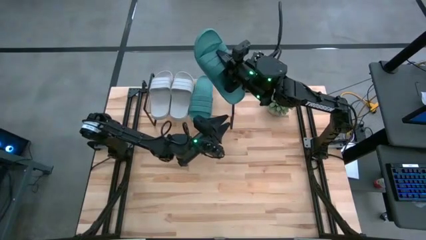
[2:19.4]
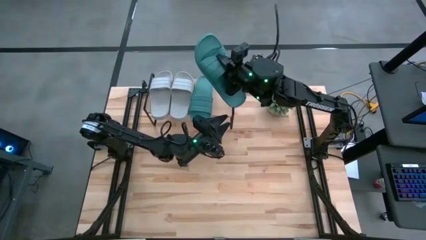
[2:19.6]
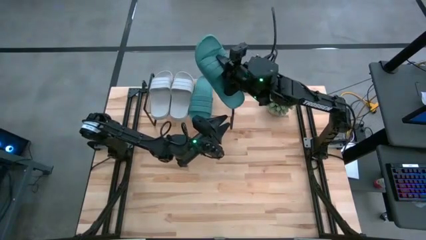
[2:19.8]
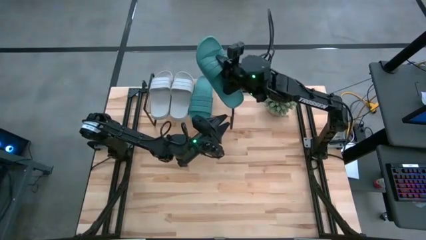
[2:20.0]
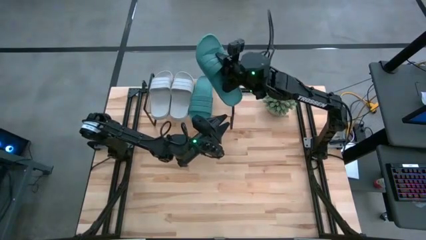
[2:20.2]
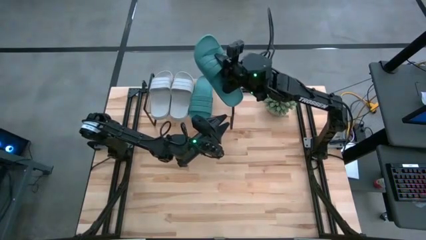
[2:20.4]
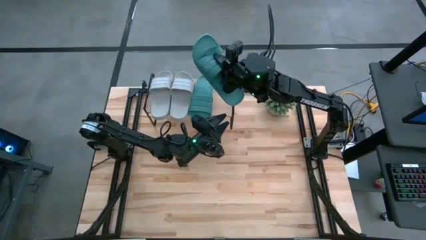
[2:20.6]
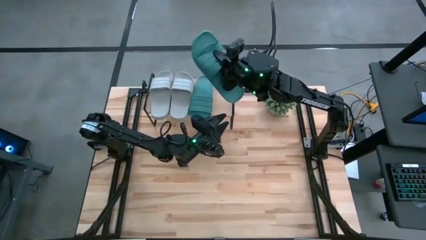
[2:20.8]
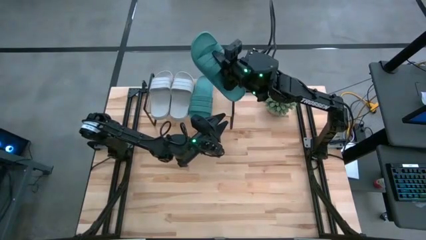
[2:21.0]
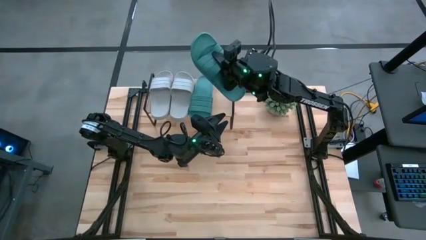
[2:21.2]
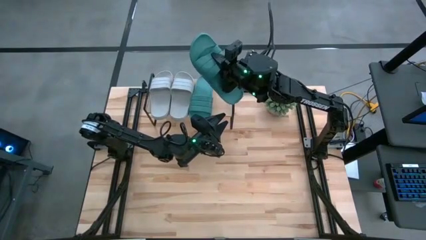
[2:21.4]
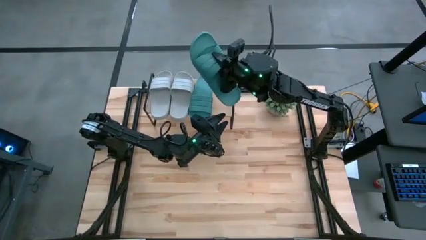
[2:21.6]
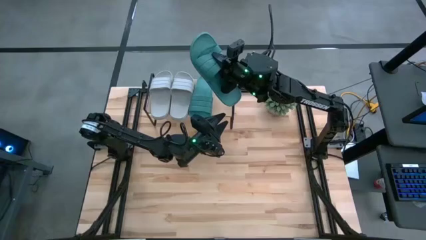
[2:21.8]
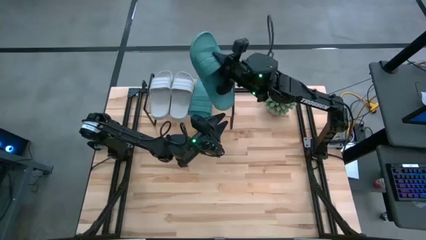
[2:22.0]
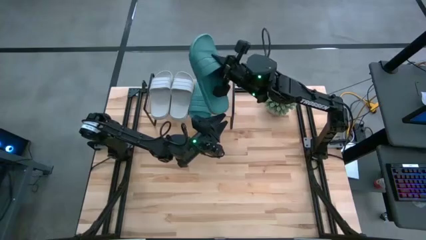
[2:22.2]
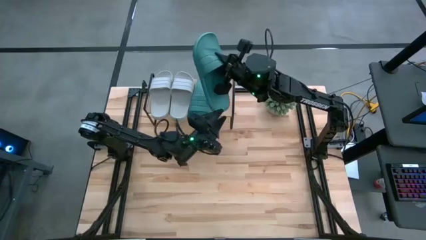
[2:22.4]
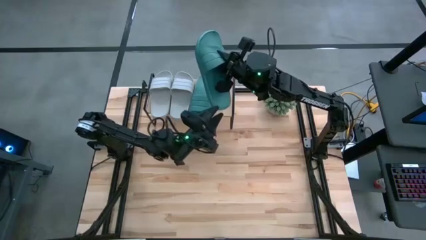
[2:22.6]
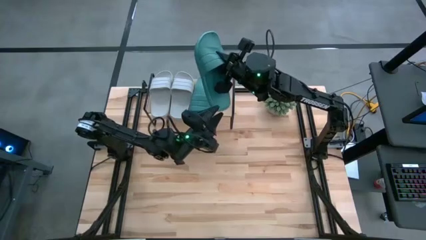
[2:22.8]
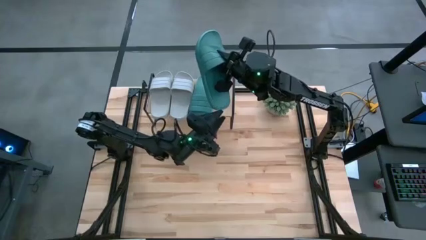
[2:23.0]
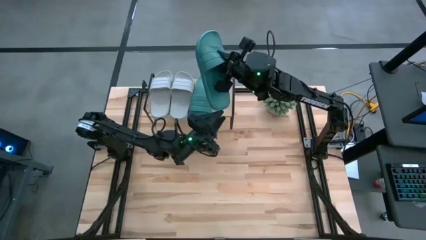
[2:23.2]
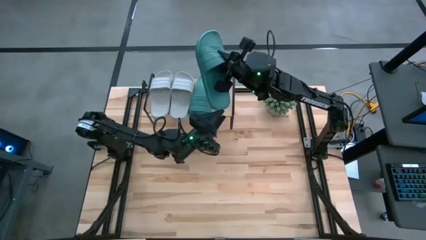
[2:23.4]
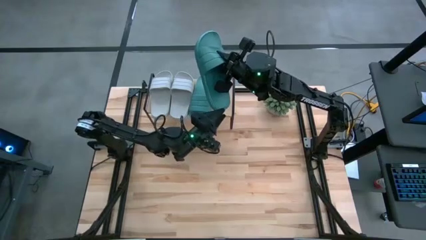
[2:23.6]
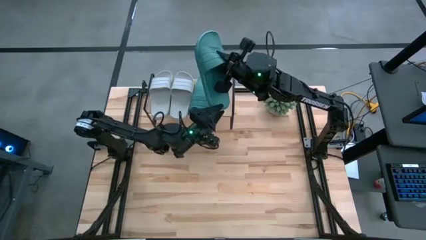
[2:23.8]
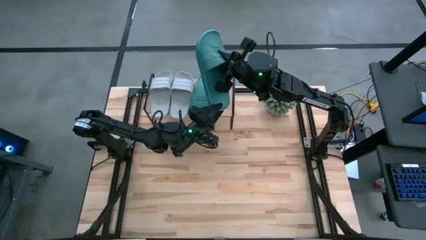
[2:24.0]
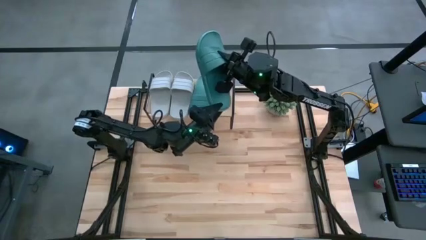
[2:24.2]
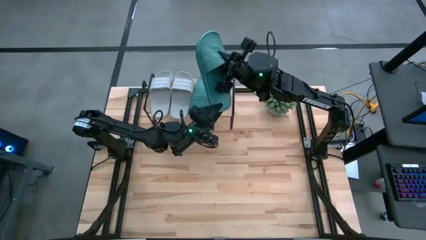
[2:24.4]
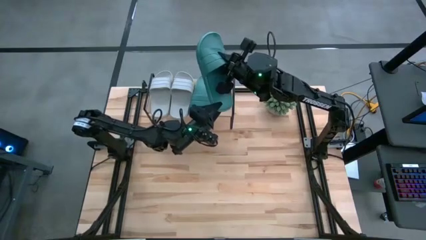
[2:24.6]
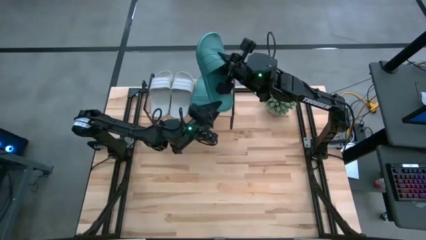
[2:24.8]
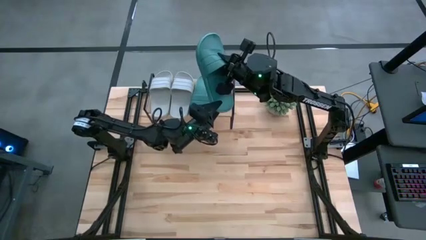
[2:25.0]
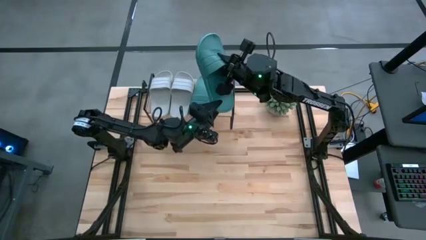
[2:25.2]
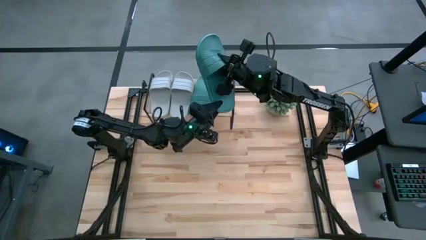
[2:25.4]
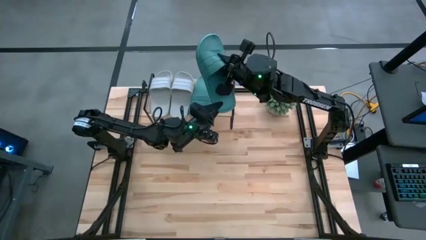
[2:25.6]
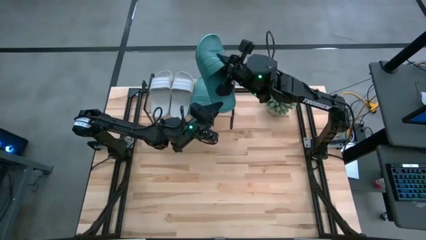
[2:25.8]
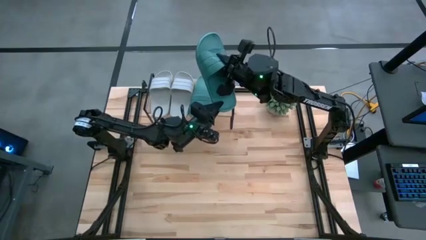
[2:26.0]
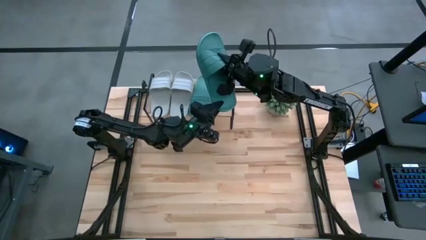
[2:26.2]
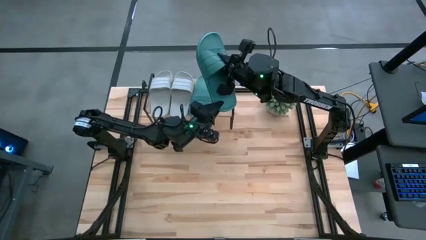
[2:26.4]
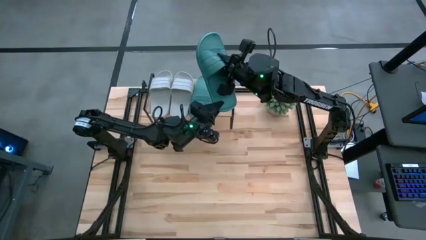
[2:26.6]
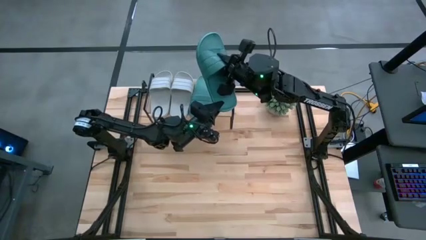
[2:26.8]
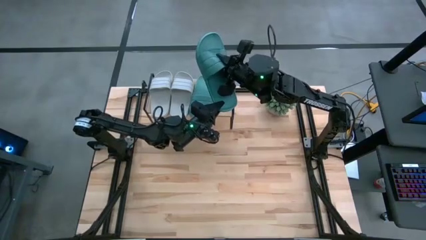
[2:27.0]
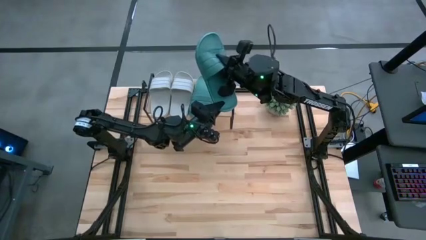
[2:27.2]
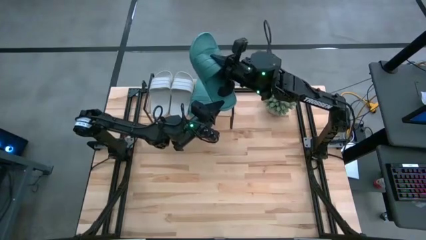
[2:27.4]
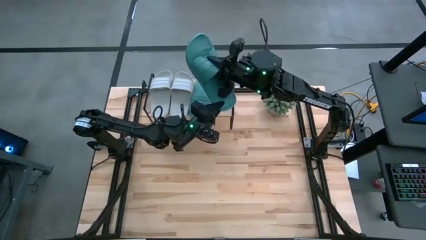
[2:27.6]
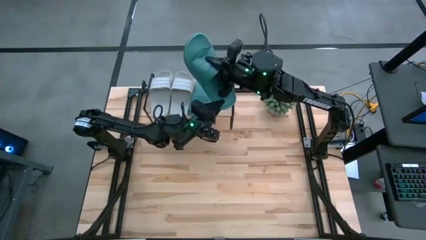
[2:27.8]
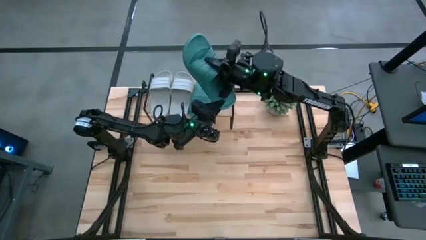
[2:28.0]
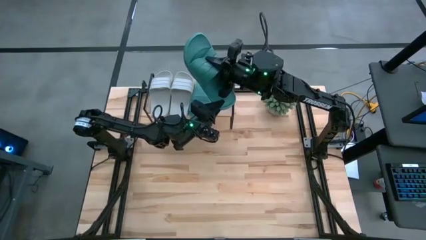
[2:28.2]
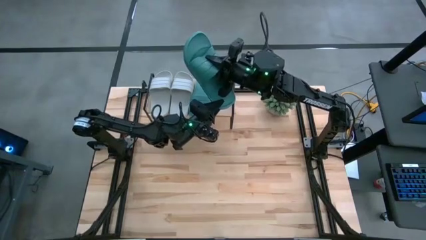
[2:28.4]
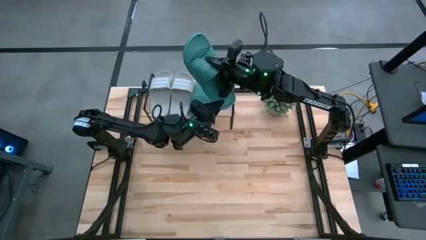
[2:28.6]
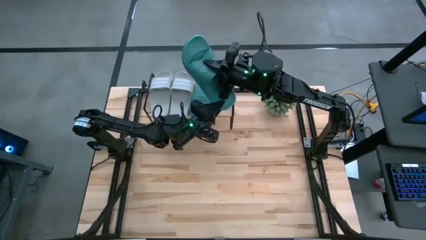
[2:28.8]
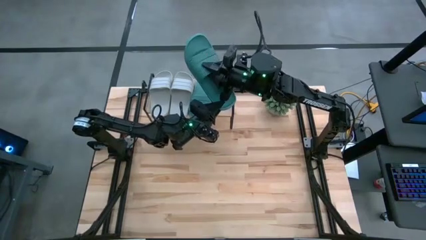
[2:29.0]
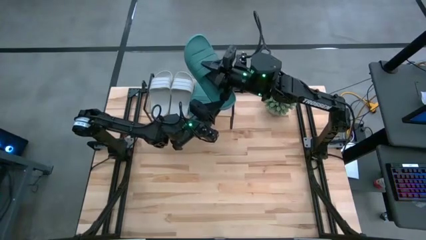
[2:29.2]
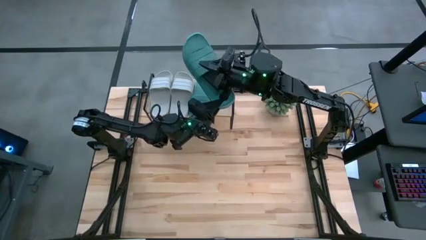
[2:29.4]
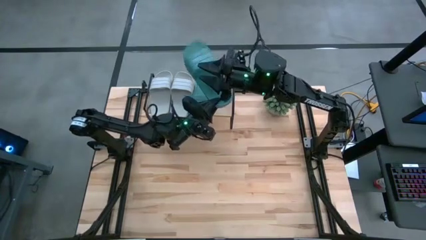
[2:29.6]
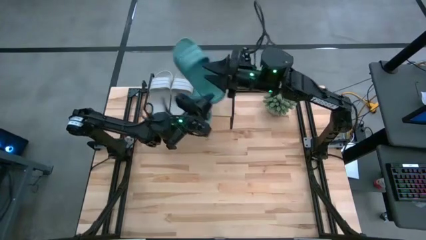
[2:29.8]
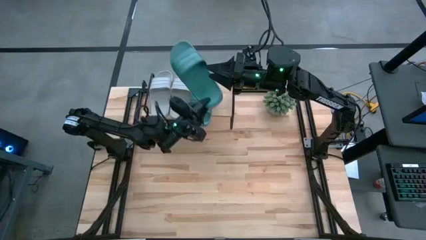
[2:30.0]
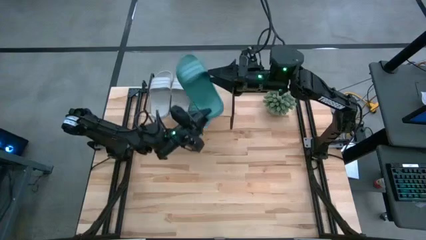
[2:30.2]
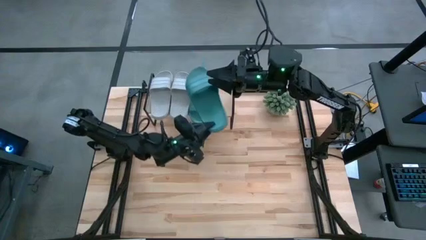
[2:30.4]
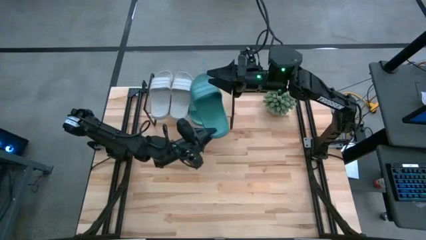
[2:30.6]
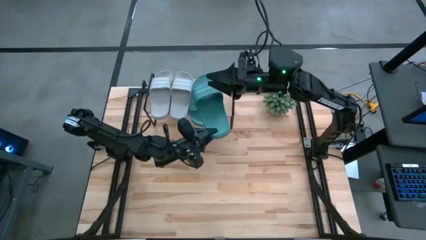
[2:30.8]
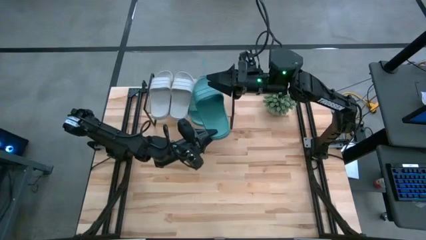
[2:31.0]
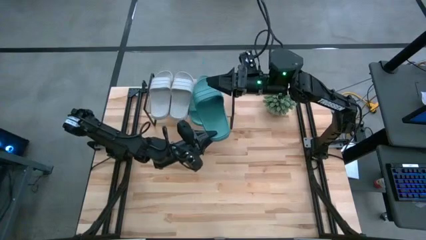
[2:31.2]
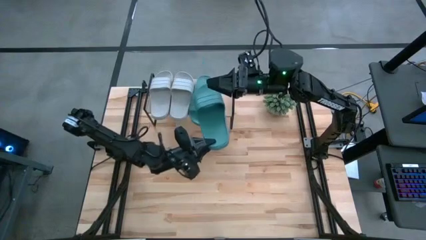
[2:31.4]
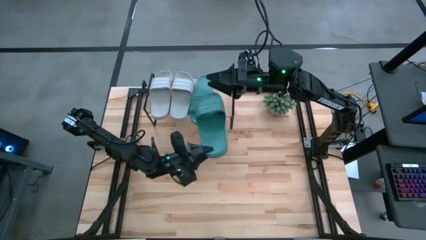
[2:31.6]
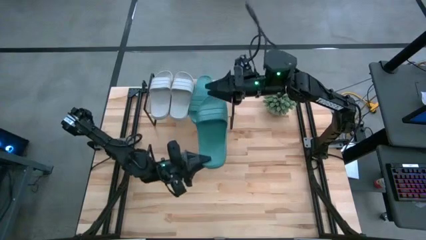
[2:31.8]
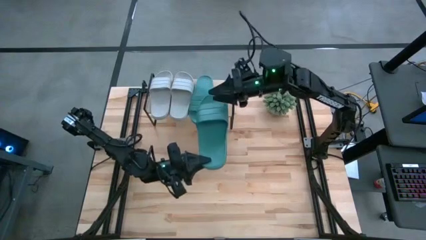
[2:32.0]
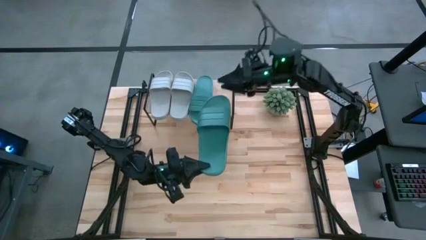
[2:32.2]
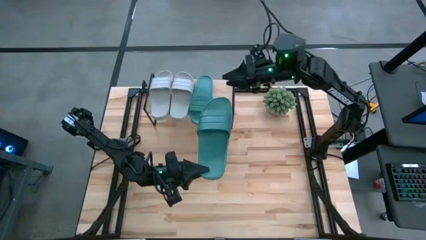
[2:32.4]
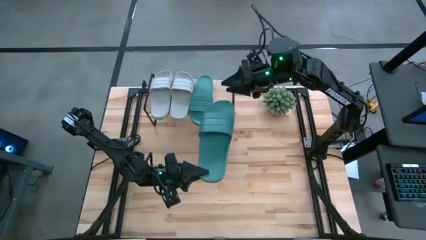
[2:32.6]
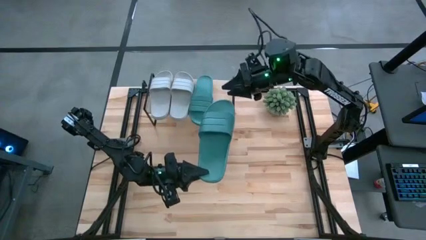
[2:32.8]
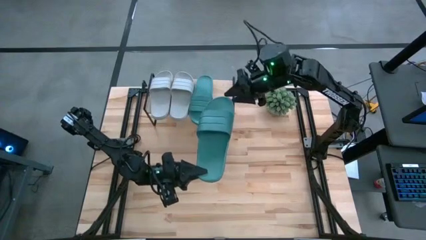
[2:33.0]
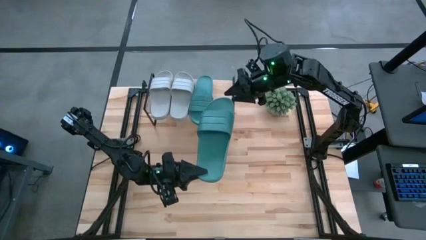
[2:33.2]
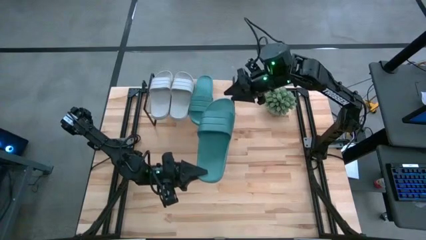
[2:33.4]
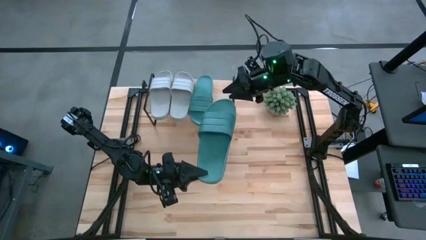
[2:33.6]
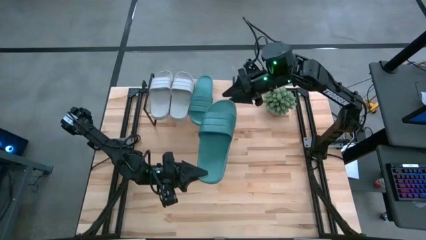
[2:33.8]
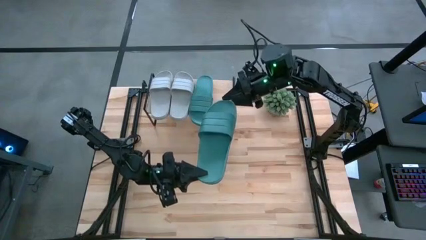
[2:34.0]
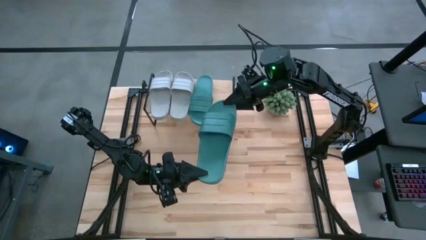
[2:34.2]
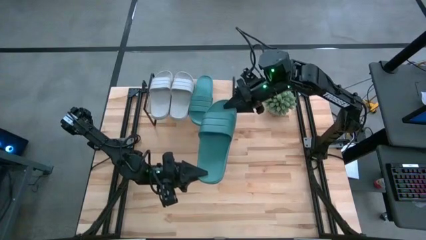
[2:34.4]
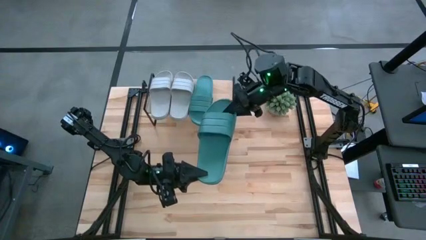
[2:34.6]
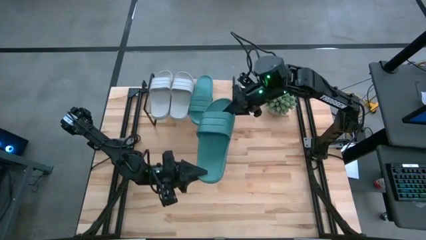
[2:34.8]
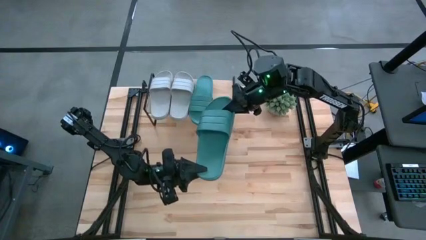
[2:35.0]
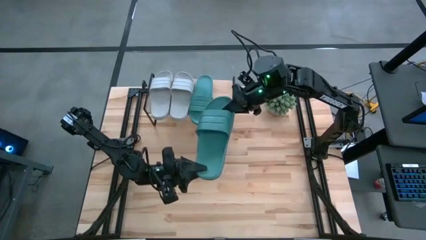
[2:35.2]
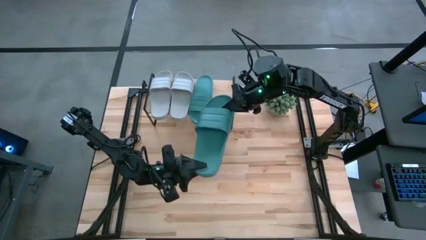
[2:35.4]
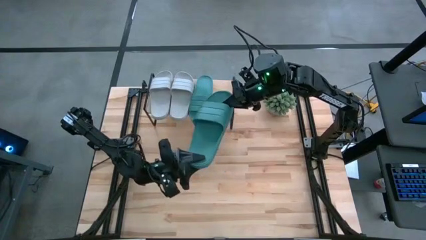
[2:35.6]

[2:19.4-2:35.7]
Task: Pick and place slides into the shelf
Put the green slipper on the shelf

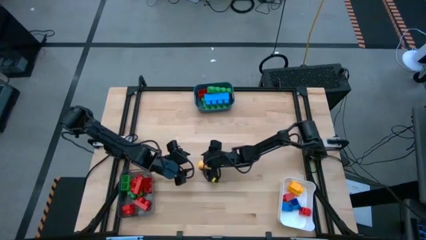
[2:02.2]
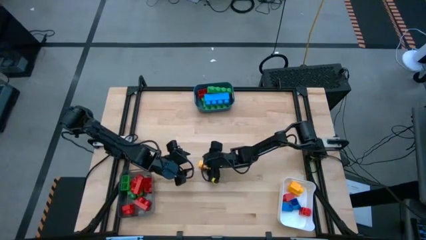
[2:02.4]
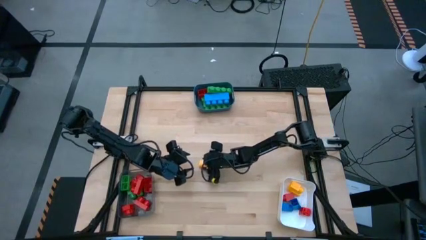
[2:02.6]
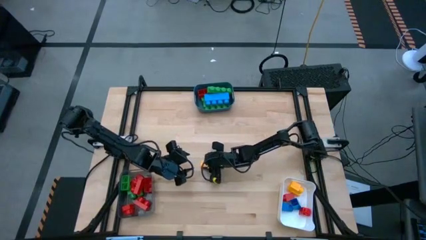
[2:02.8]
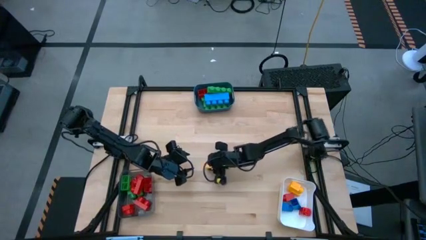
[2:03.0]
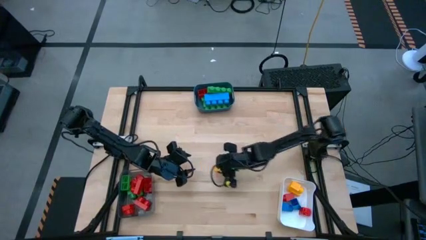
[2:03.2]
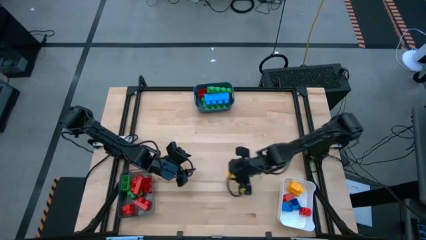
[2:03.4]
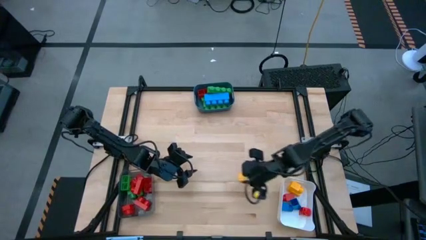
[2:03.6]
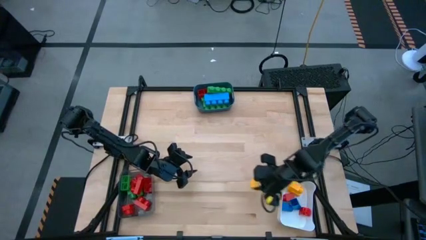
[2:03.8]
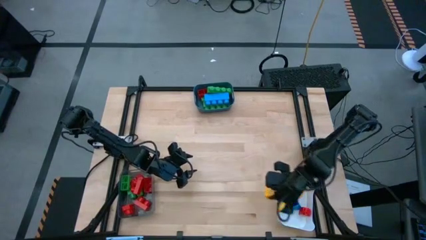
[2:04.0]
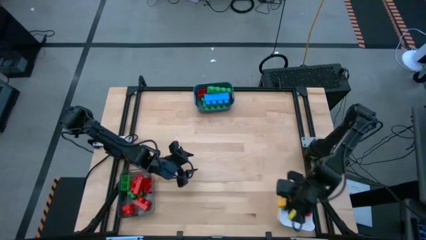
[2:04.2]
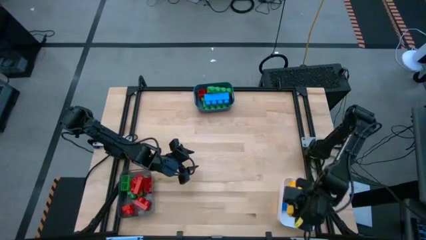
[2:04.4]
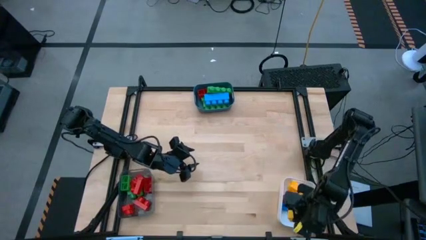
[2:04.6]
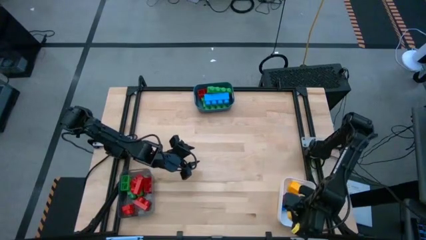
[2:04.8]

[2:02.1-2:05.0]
Task: Sort blocks by size
Put the yellow game piece into the white container
